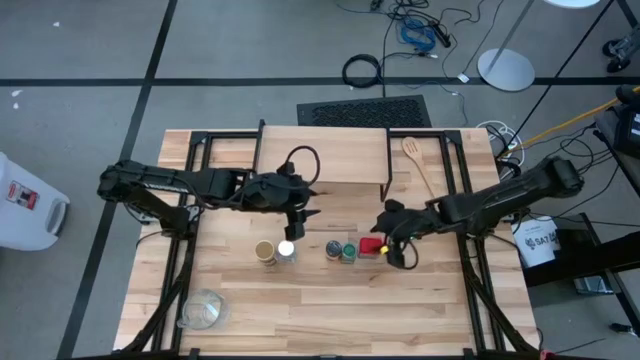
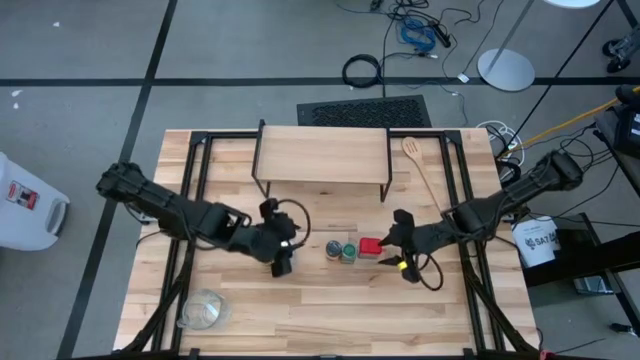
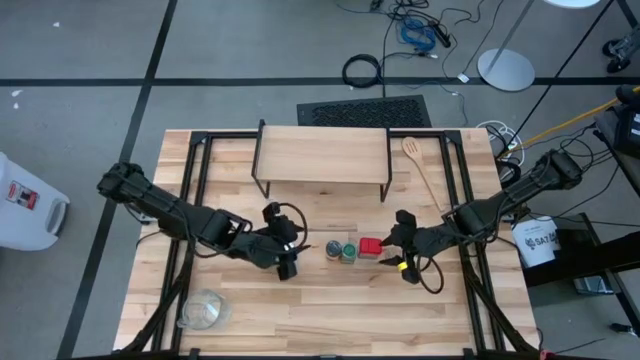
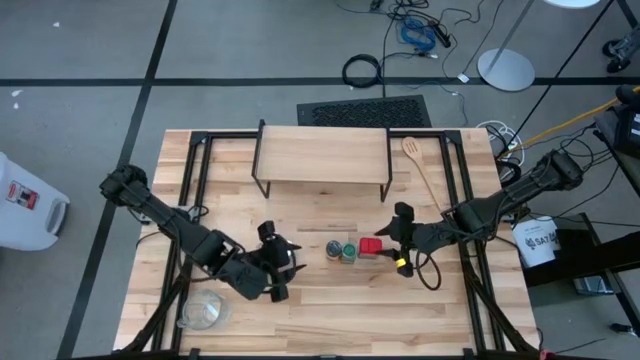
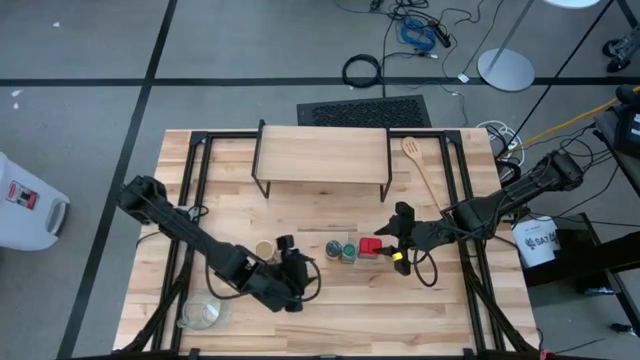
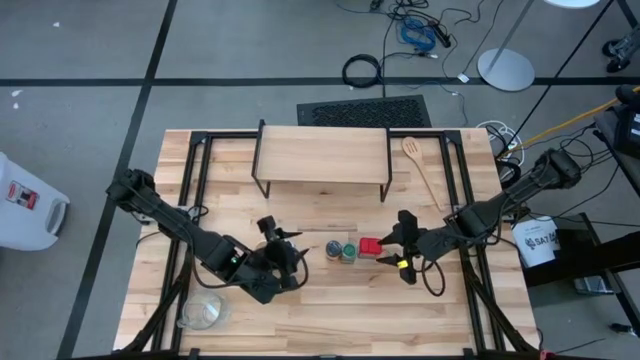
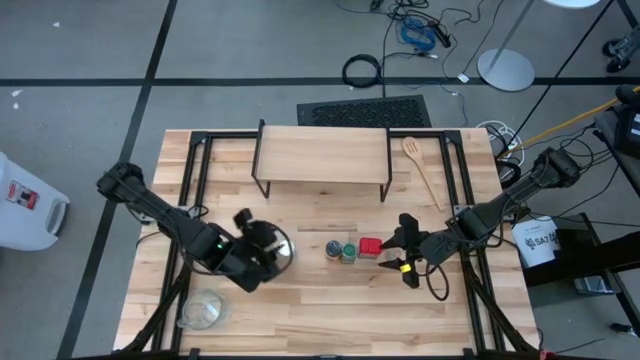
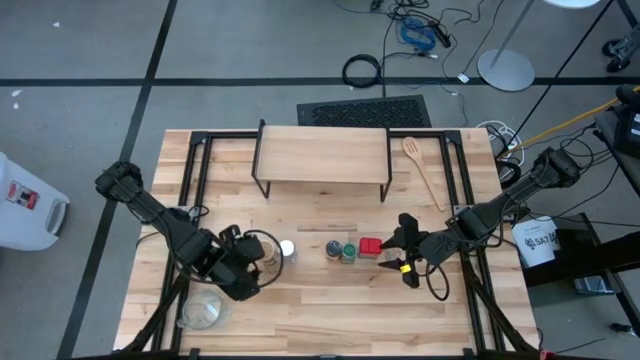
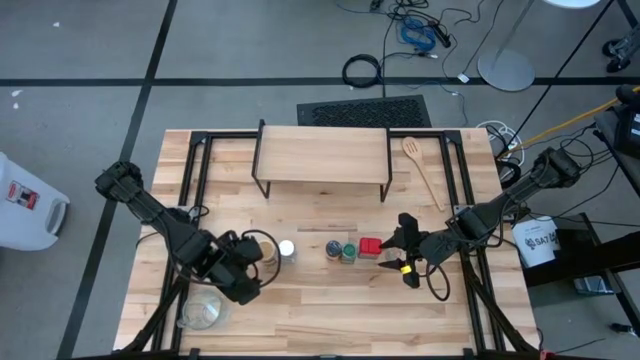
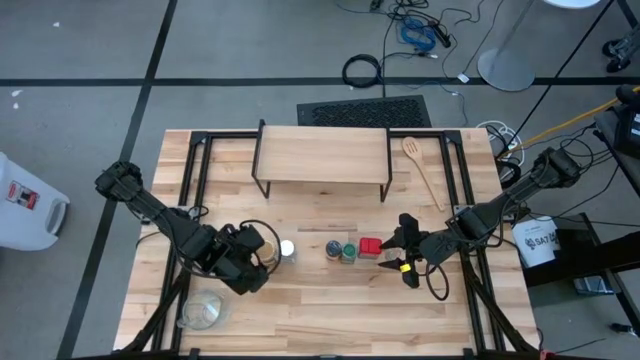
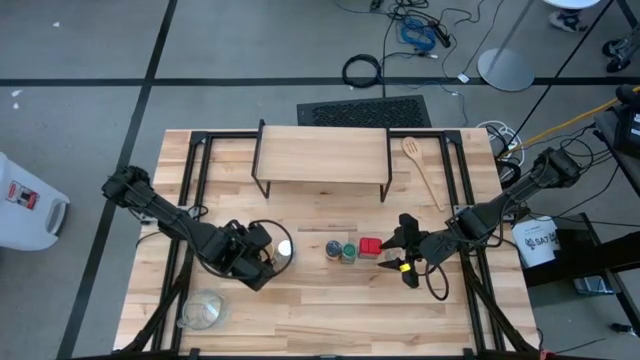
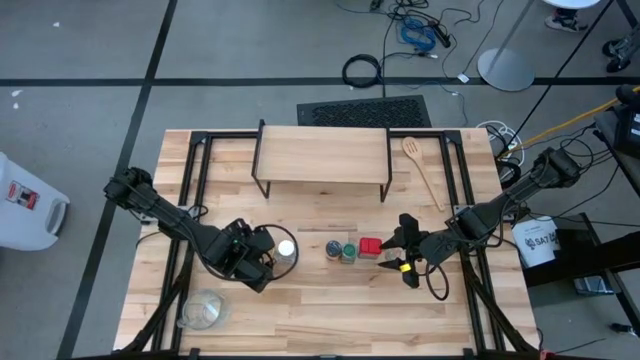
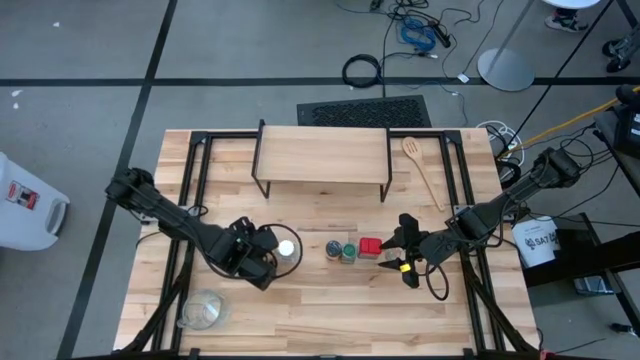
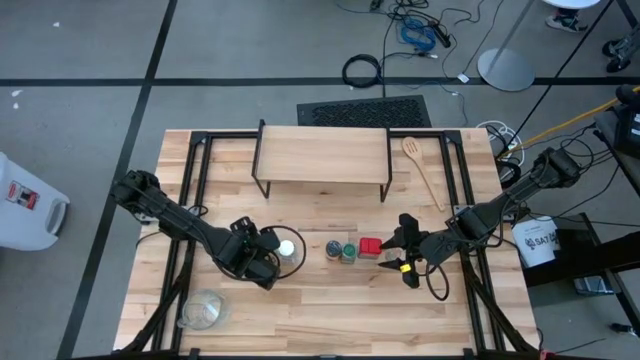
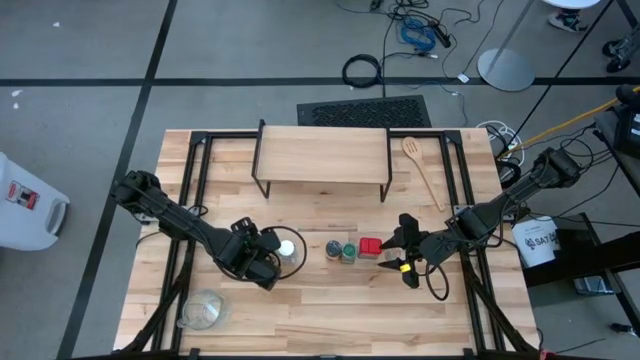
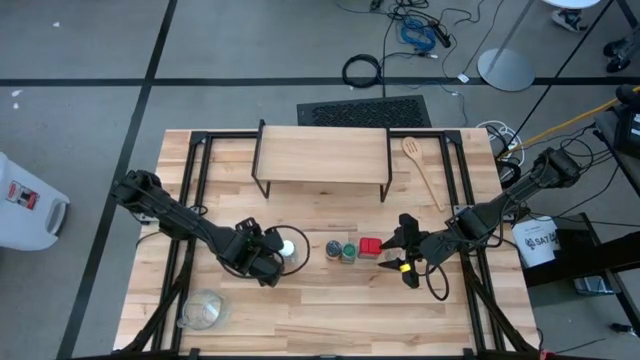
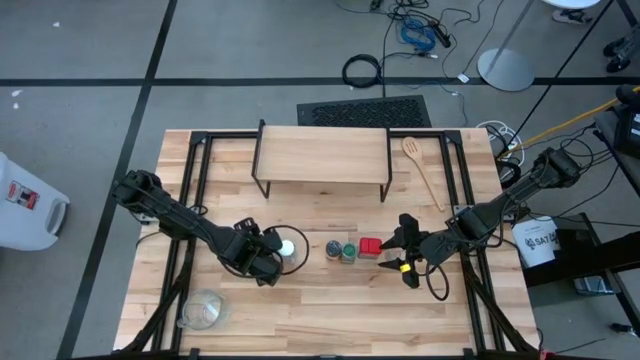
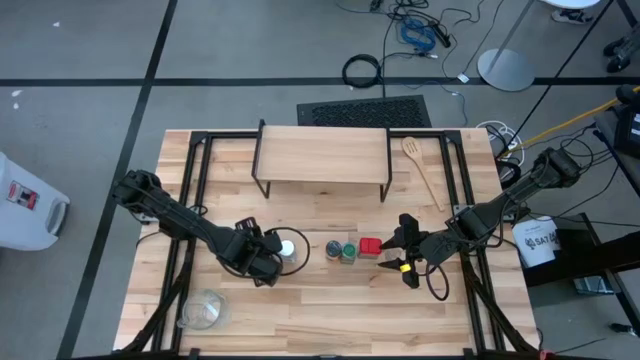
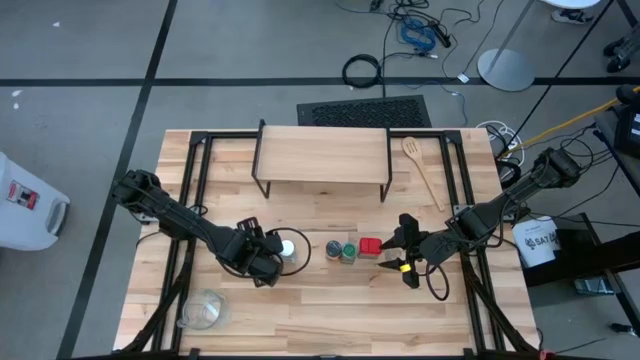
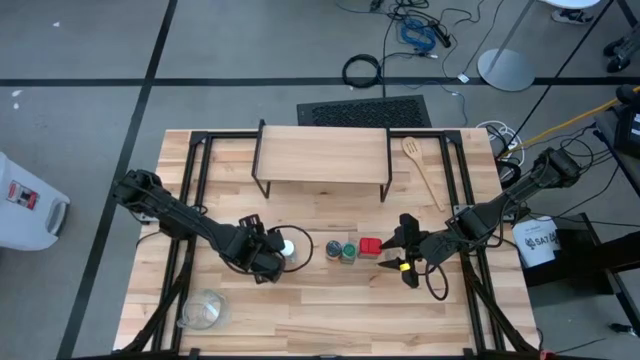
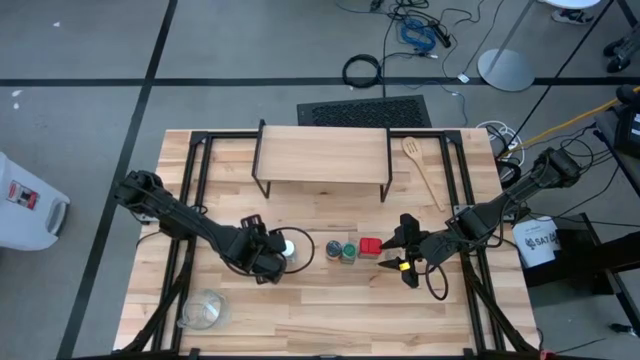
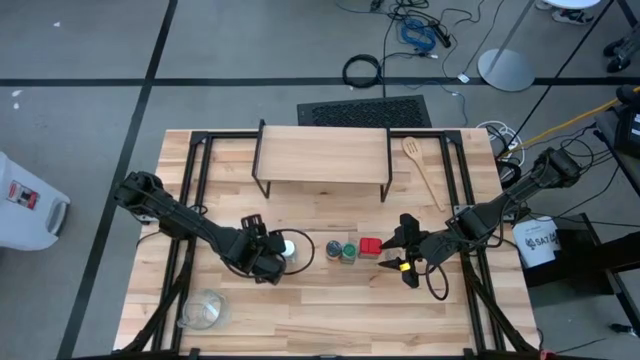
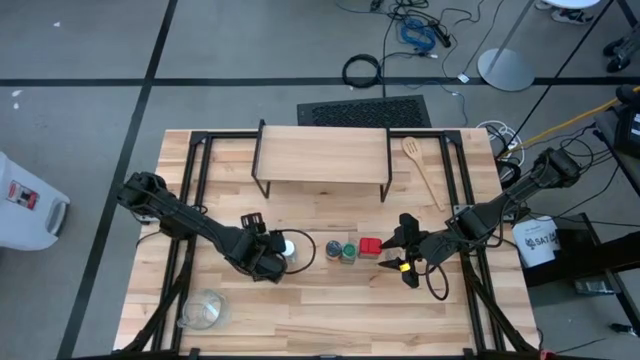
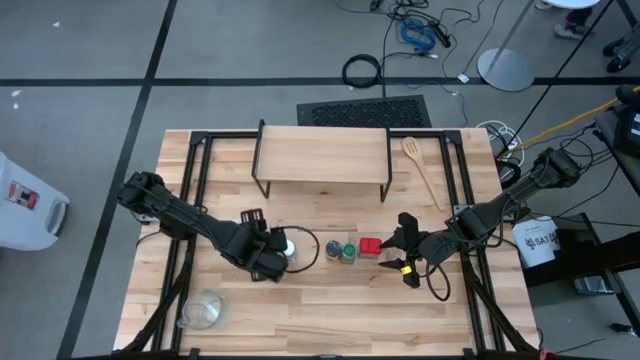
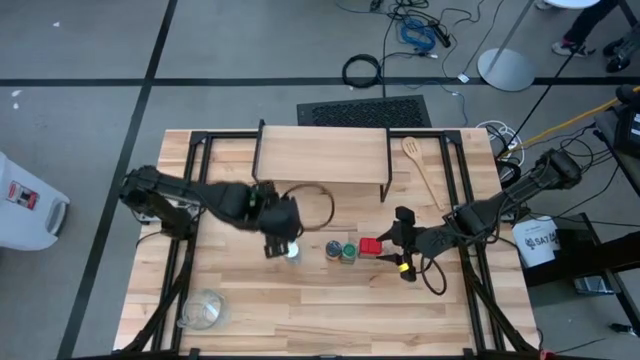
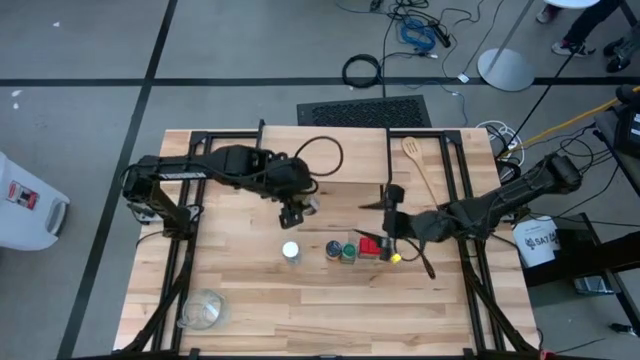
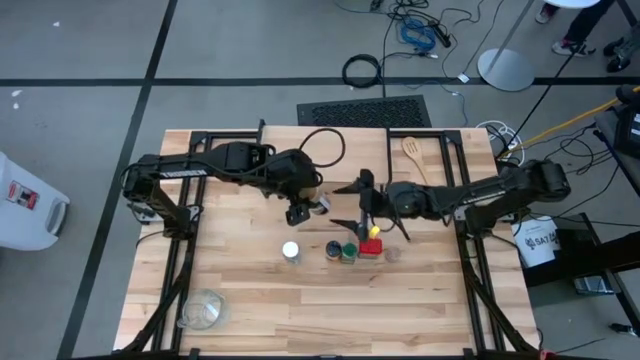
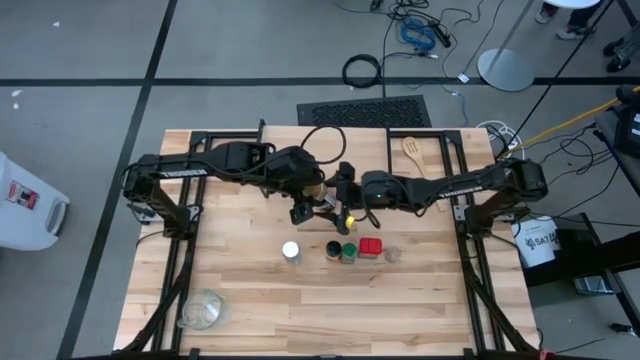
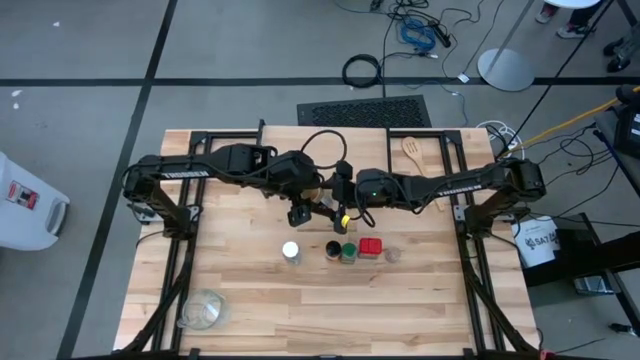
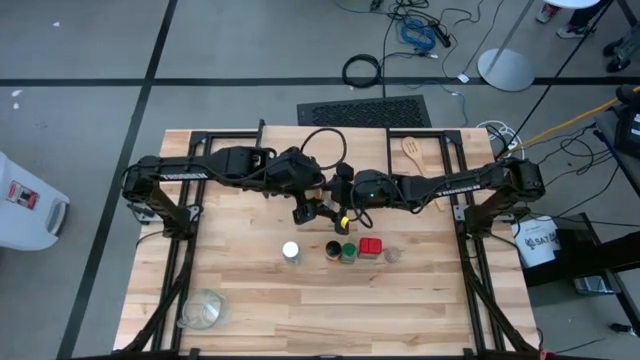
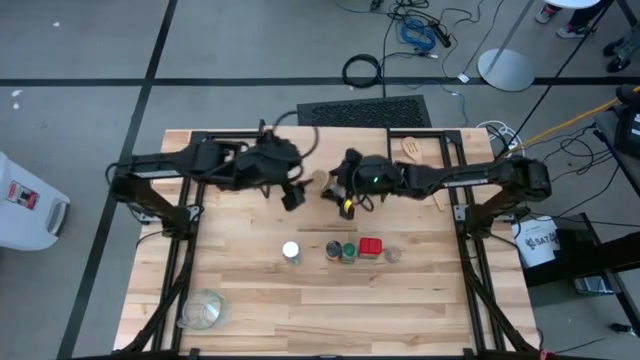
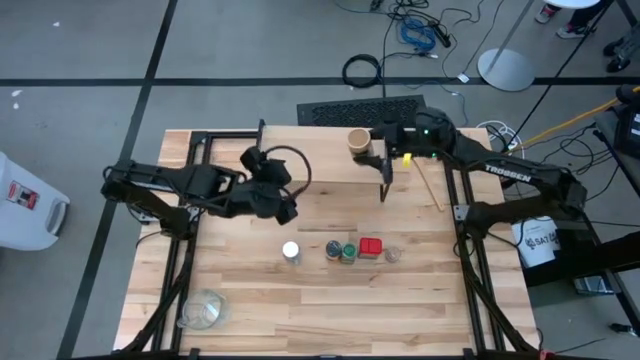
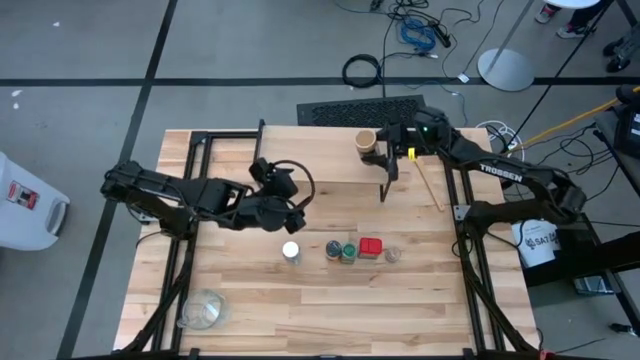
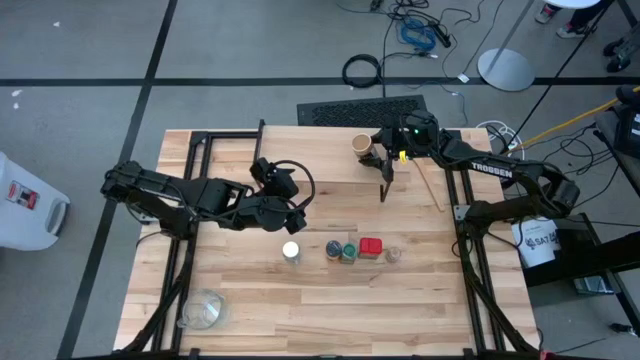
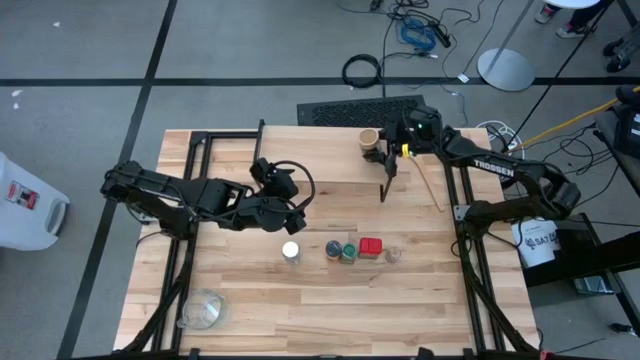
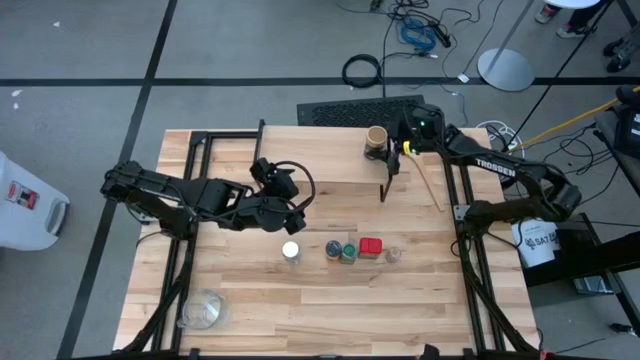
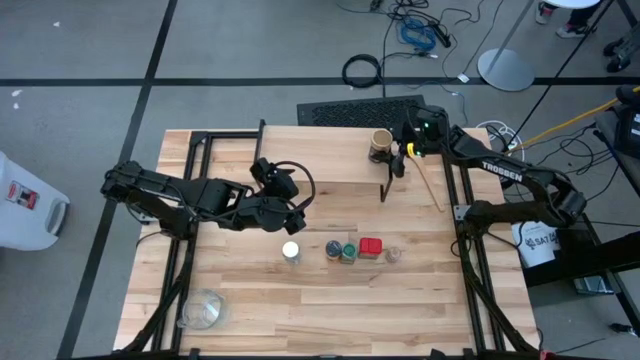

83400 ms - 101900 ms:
Task: Shelf spices
Put the golden seasoning bottle on the shelf
